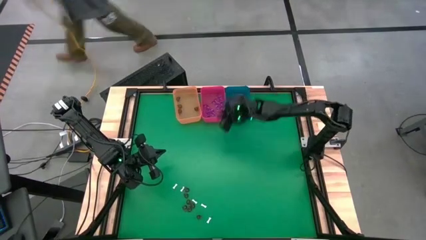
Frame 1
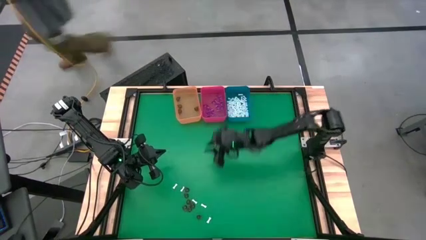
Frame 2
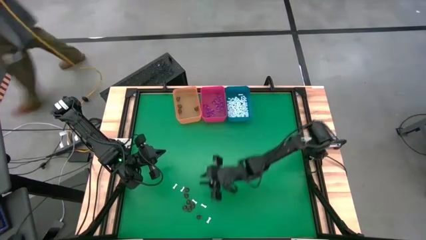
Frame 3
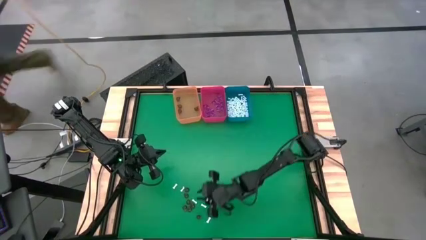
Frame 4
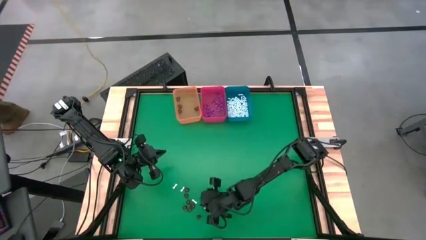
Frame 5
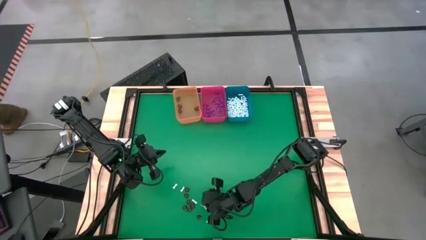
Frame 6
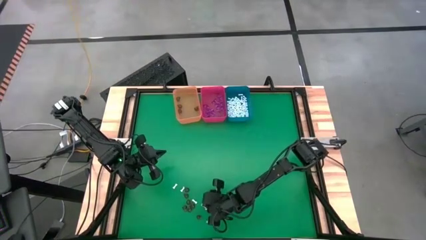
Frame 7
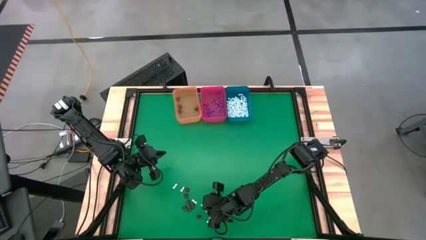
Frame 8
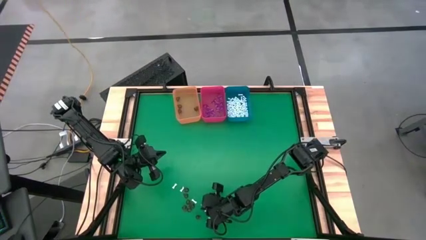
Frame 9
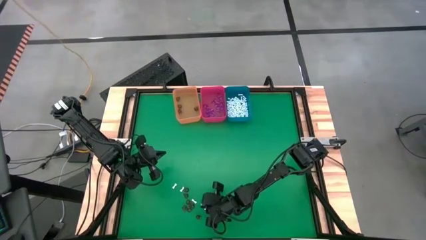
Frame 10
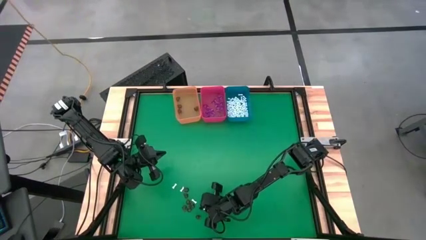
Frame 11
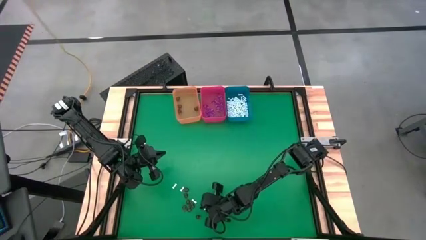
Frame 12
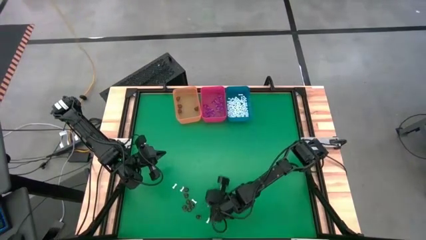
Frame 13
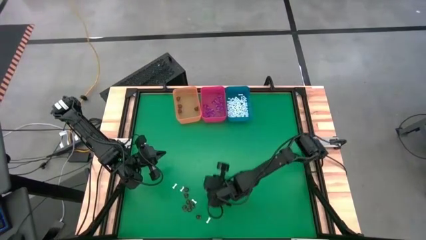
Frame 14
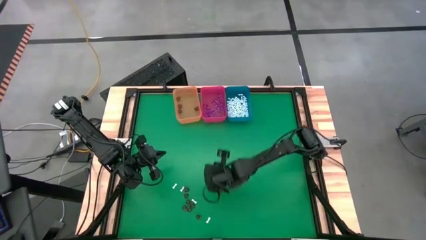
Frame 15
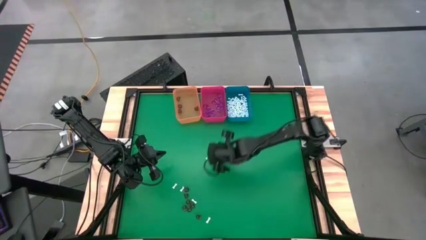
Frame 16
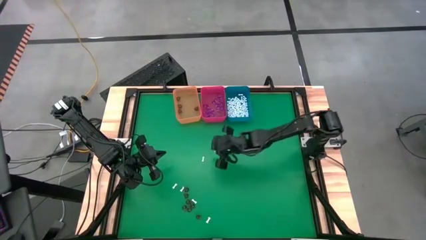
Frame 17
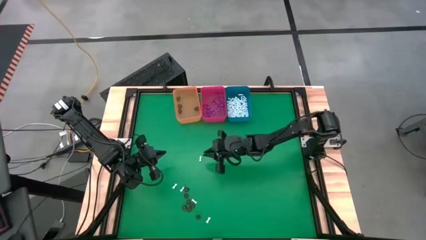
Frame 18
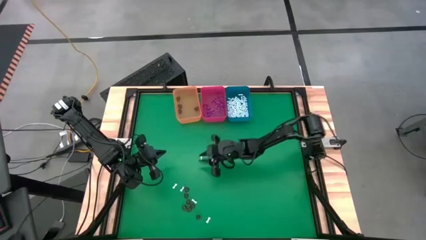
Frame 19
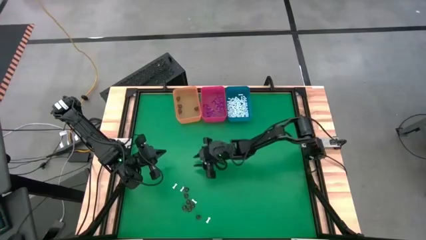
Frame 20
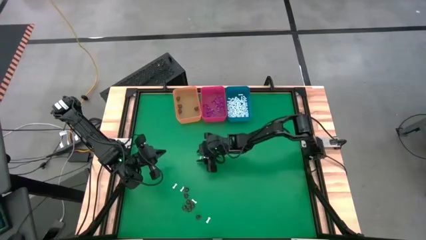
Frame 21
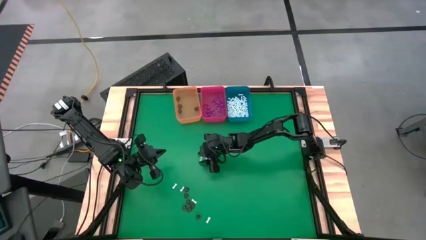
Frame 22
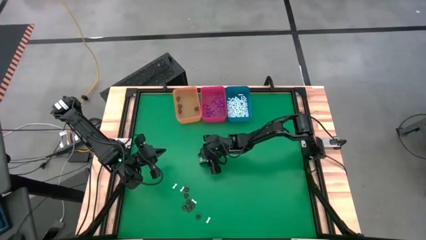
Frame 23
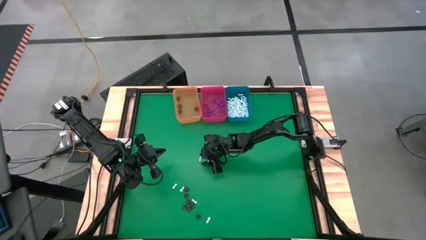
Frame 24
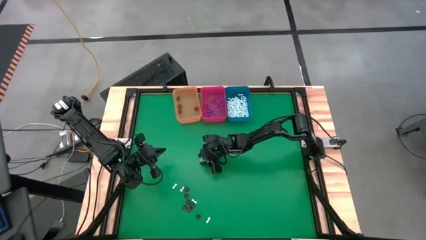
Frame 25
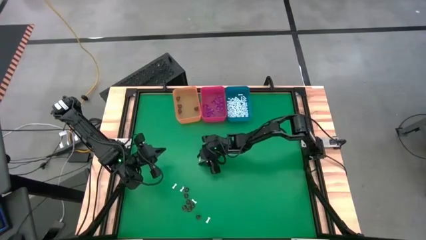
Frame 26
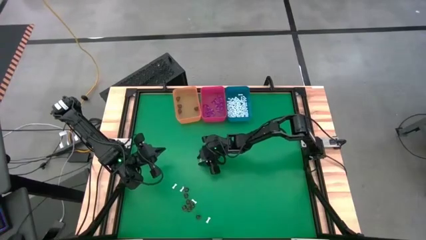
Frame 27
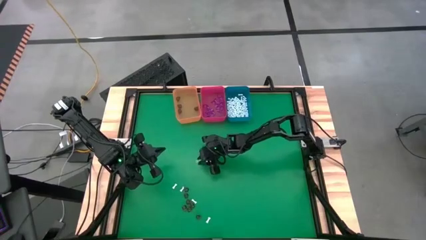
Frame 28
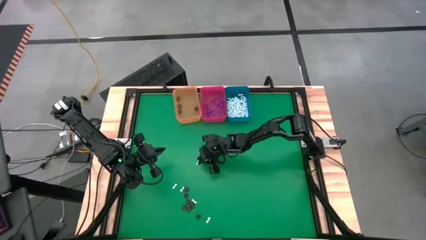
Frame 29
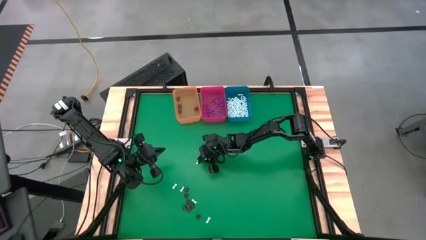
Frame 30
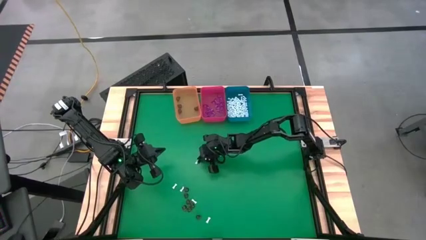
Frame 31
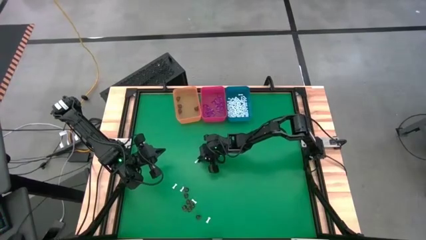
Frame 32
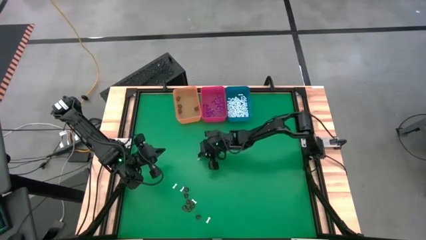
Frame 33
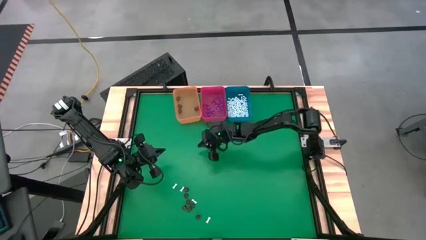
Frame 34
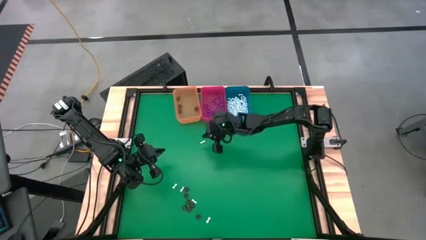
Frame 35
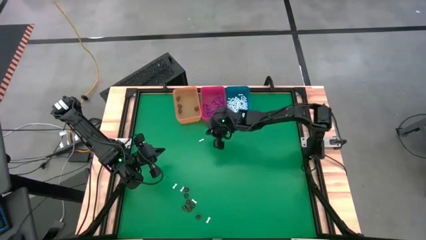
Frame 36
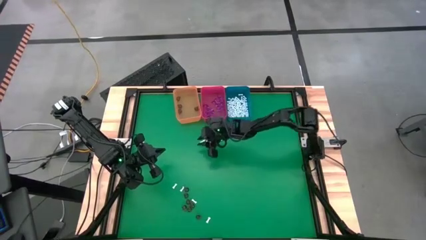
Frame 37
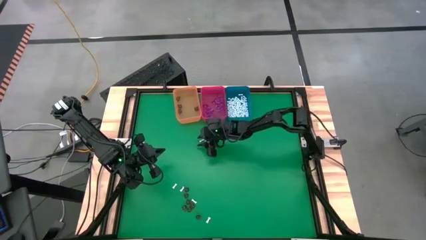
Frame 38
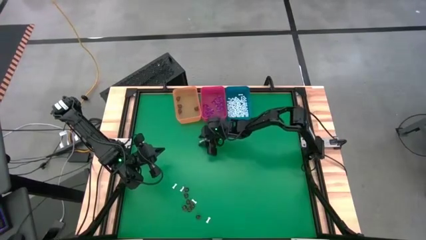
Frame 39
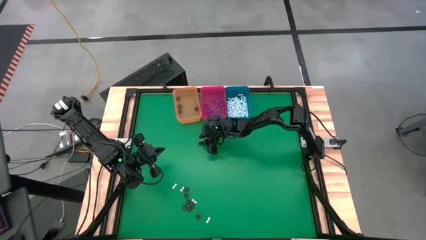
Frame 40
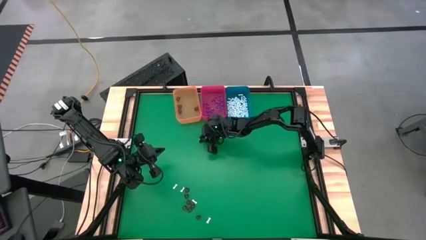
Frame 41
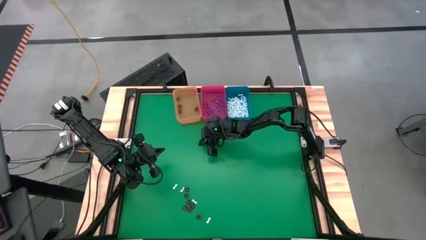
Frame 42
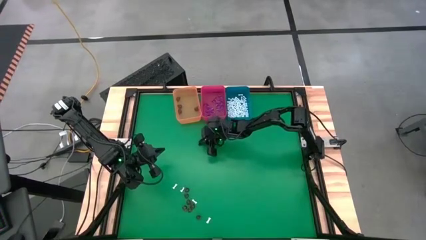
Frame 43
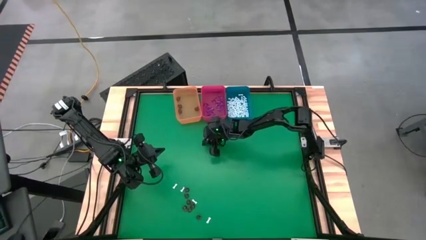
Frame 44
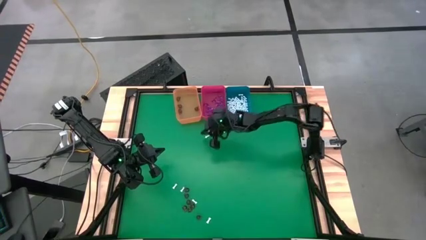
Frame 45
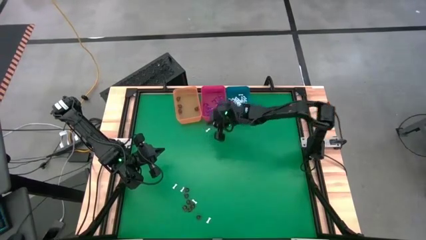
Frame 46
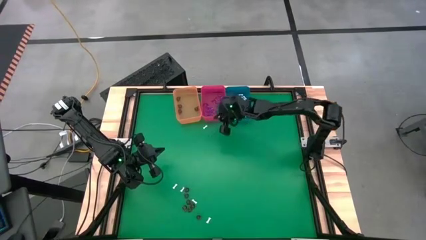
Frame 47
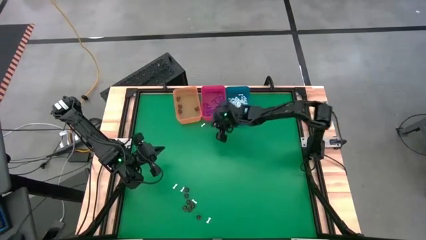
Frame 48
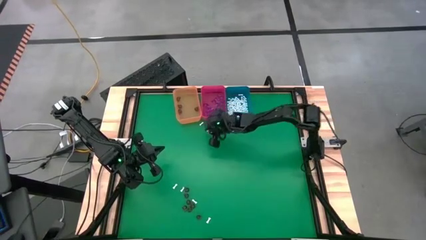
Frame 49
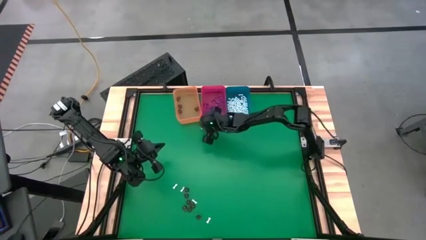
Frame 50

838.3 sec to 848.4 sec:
Task: Sort Halloween decoration
Put the white bone toy into the blue bin

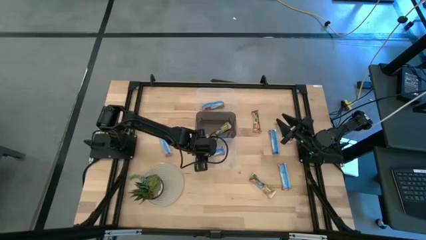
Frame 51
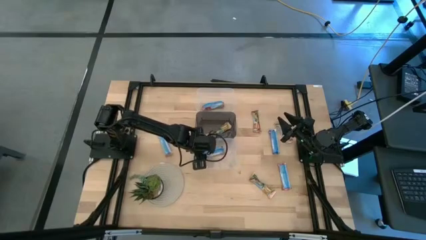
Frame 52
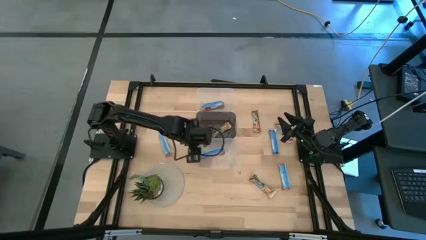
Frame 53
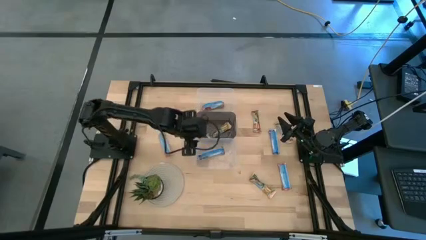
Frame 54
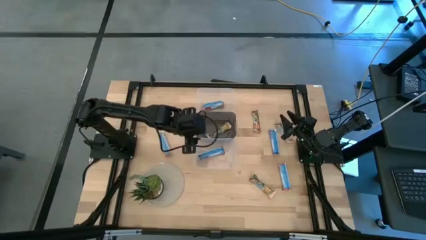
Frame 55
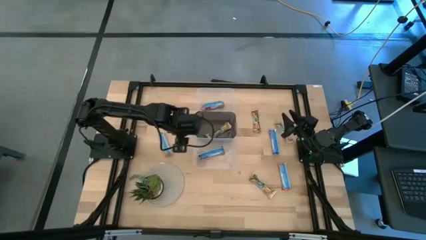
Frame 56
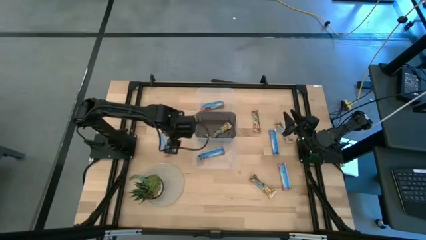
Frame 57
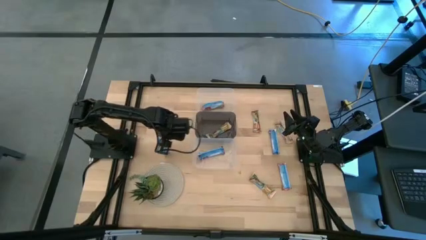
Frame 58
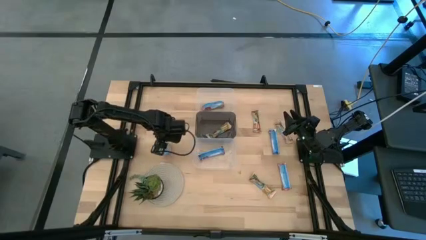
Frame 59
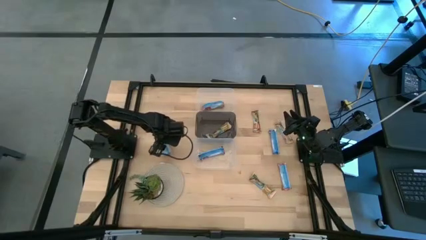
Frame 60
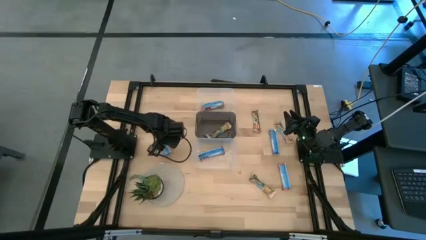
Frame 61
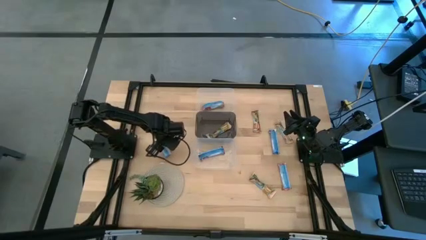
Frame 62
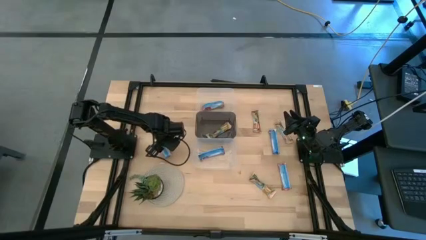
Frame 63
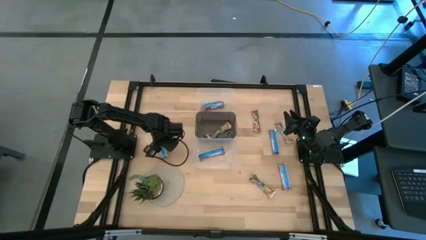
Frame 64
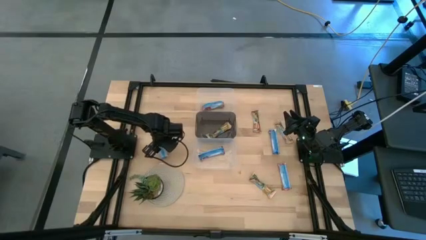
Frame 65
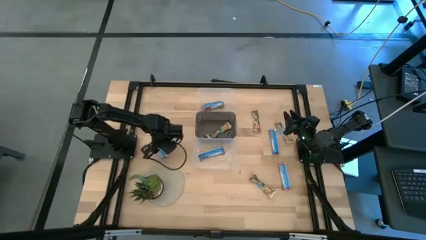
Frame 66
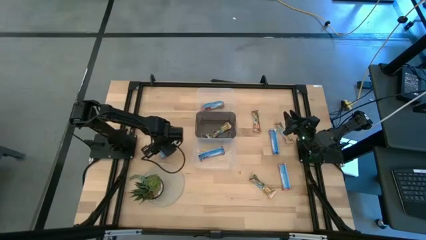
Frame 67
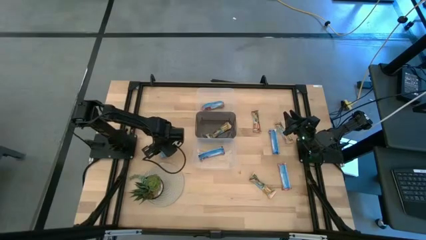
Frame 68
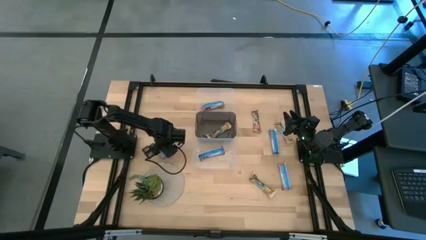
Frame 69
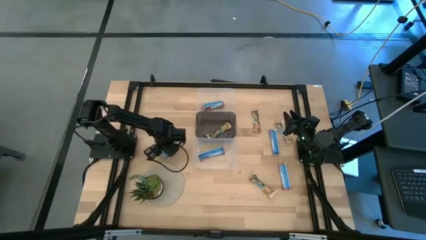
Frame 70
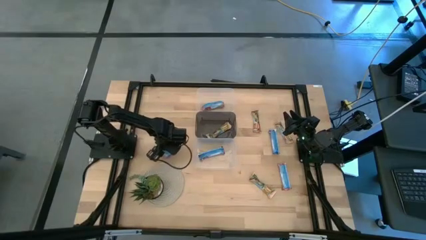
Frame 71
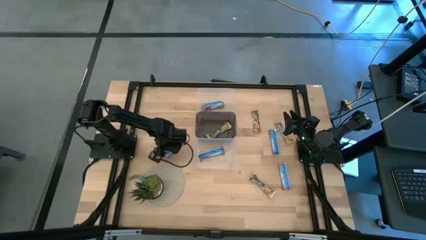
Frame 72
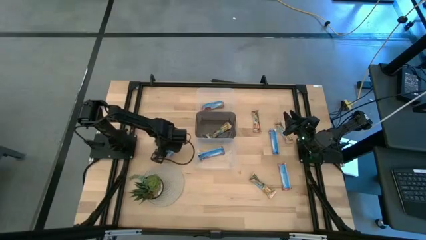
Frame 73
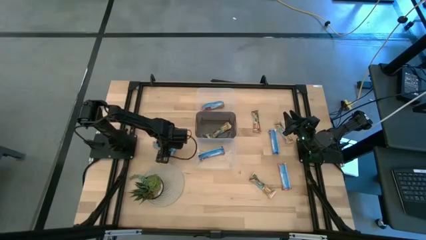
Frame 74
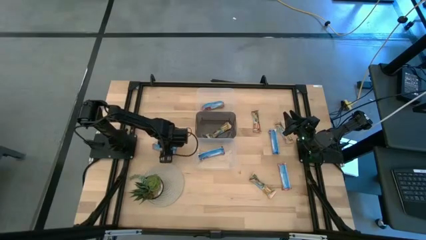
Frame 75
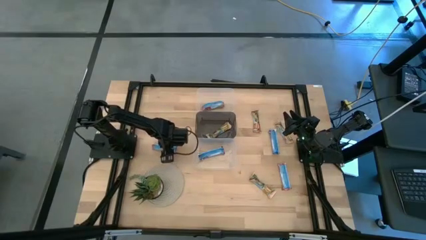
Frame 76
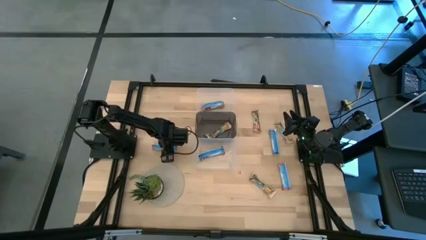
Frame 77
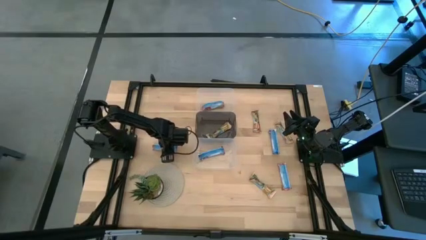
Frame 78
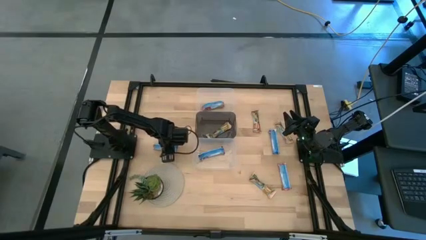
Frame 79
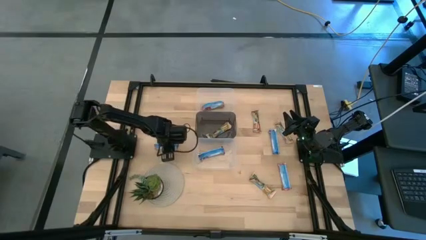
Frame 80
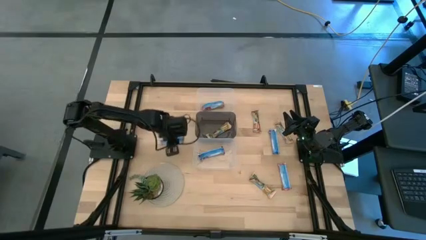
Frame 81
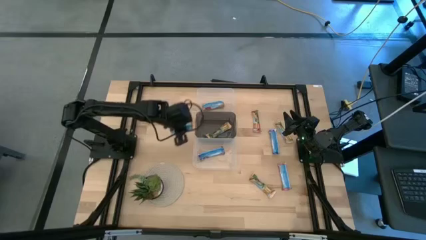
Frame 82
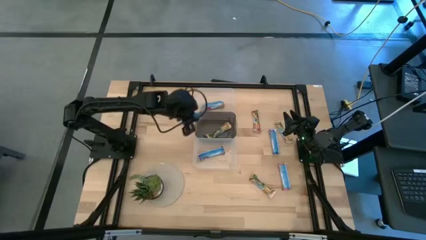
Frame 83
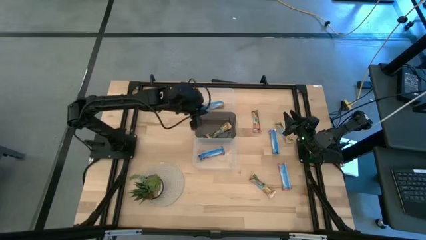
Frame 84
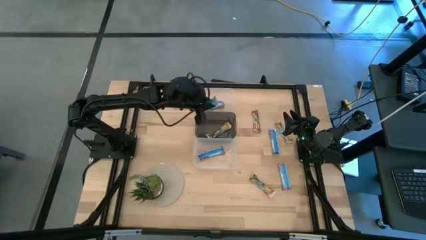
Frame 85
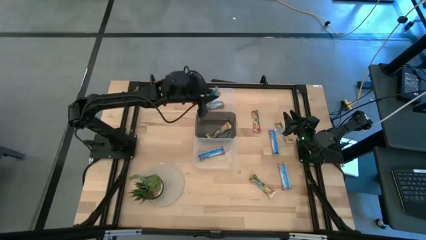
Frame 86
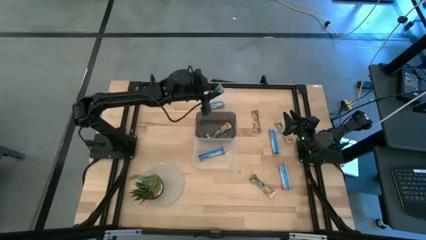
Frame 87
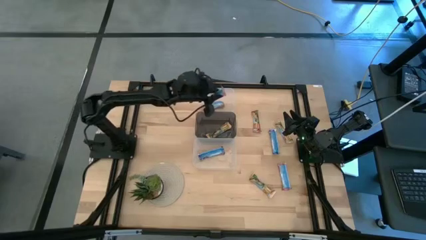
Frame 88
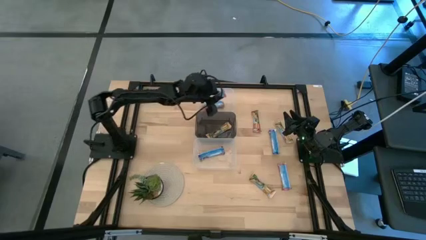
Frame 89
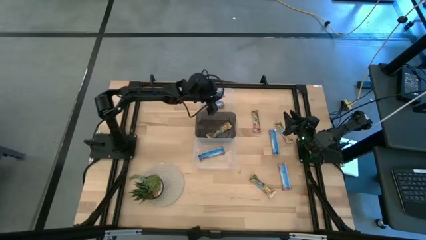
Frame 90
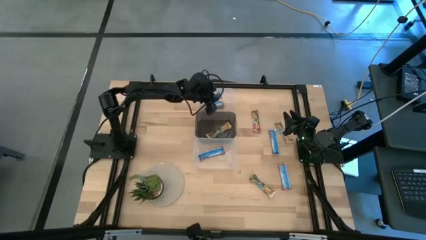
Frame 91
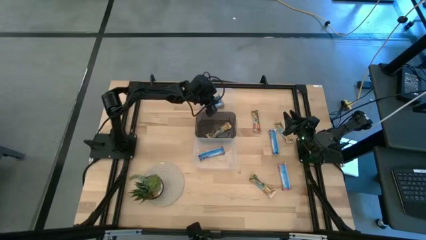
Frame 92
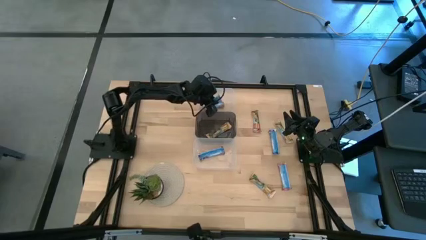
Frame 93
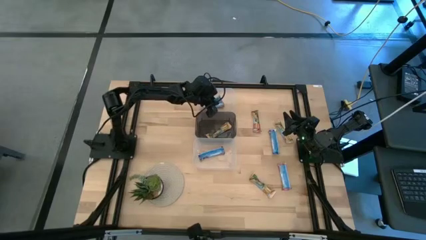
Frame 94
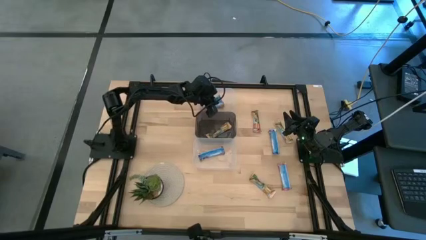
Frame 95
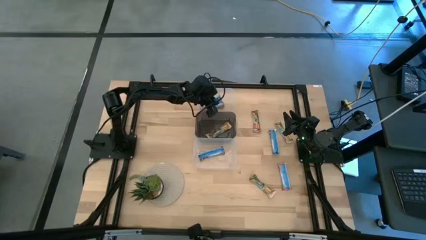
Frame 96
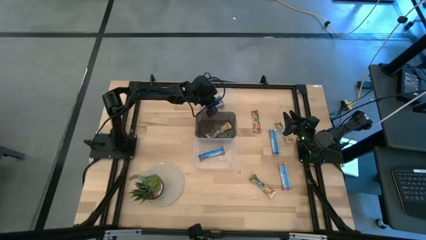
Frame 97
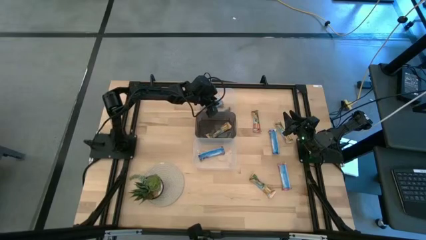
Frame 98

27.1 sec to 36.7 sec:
Task: Pick and place Granola Bars by type
Put the red granola bar into the top transparent bin
